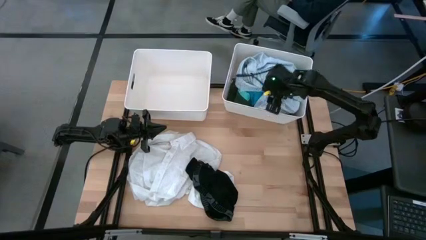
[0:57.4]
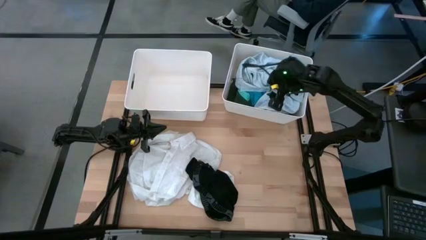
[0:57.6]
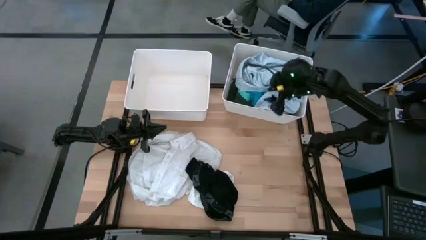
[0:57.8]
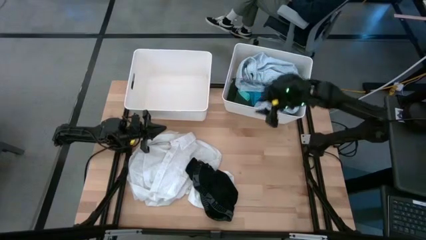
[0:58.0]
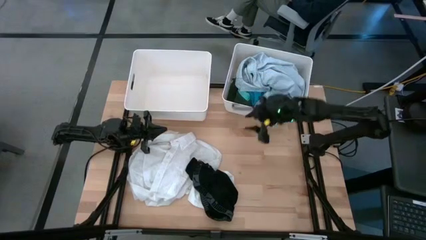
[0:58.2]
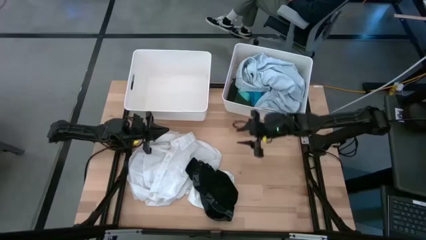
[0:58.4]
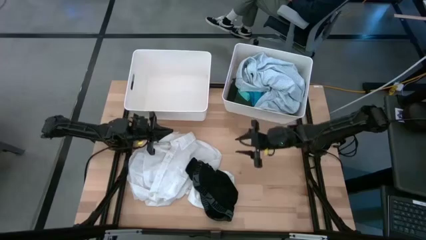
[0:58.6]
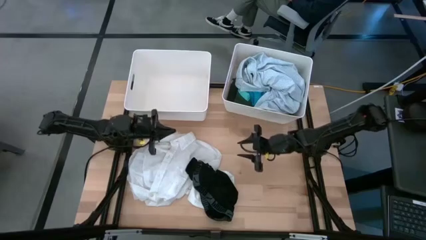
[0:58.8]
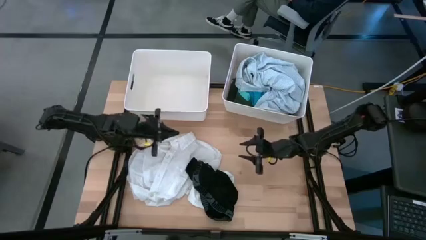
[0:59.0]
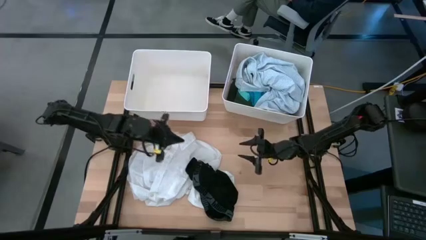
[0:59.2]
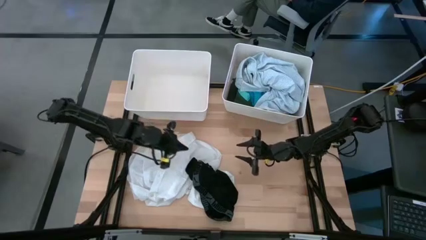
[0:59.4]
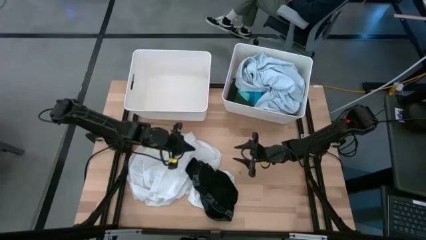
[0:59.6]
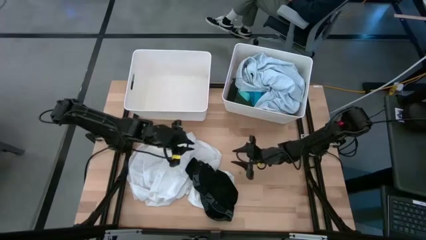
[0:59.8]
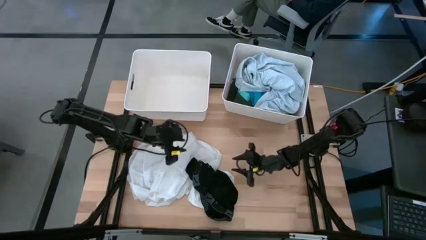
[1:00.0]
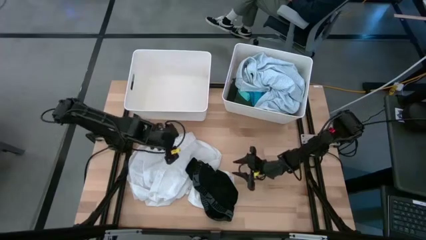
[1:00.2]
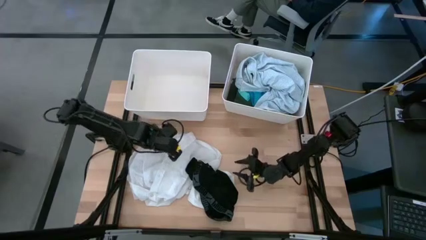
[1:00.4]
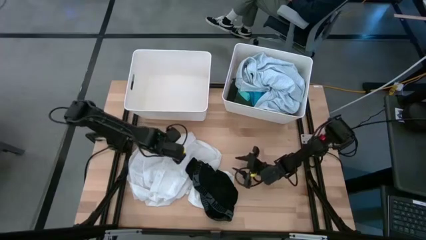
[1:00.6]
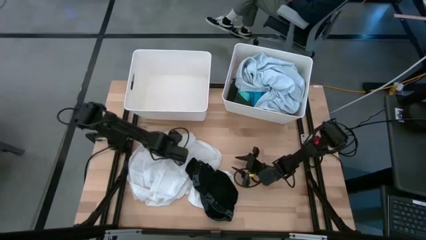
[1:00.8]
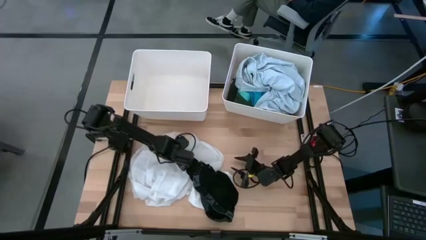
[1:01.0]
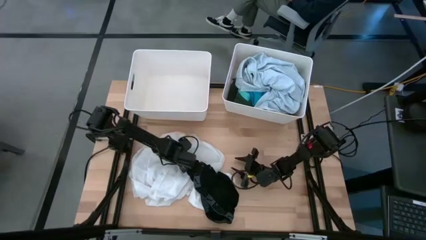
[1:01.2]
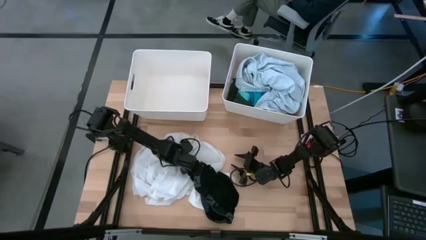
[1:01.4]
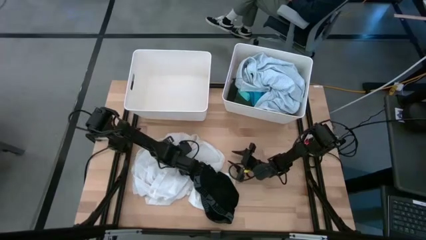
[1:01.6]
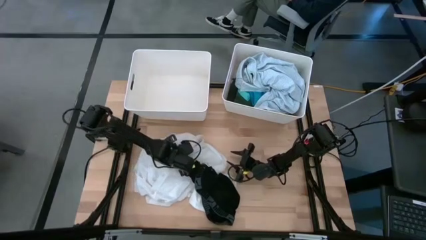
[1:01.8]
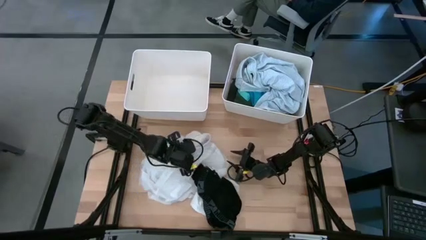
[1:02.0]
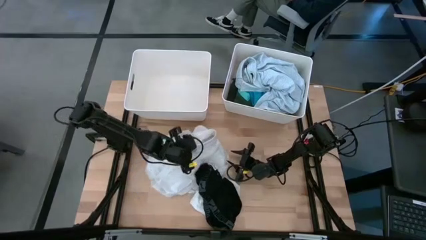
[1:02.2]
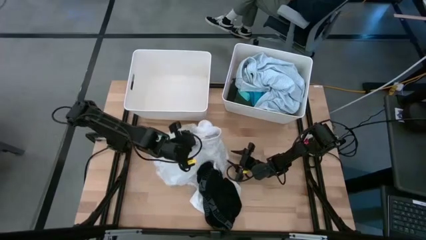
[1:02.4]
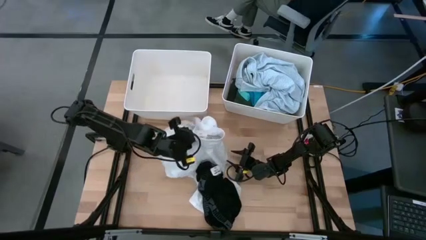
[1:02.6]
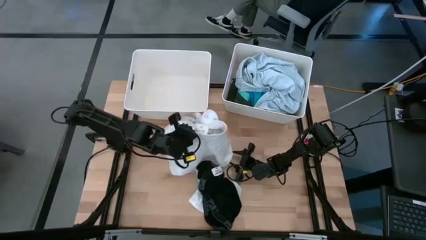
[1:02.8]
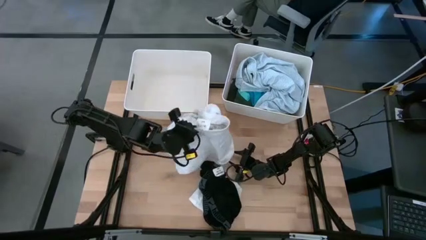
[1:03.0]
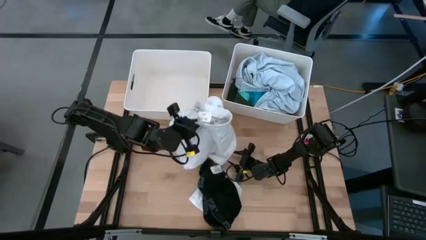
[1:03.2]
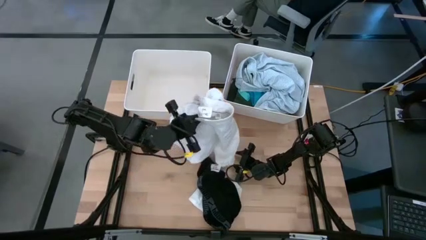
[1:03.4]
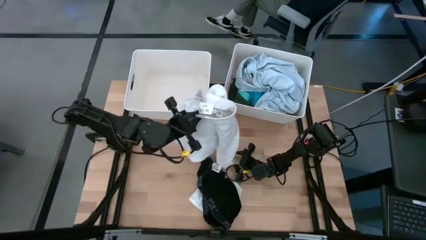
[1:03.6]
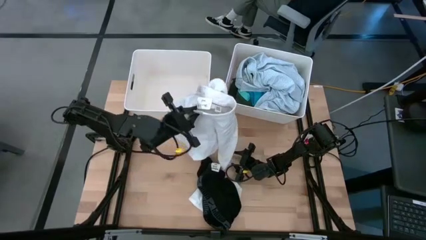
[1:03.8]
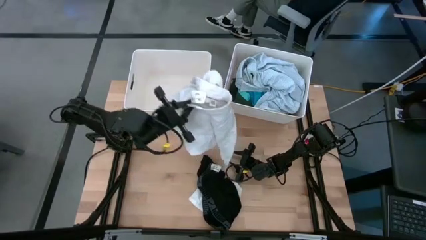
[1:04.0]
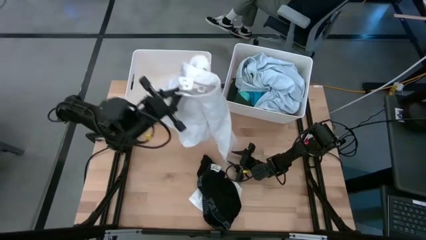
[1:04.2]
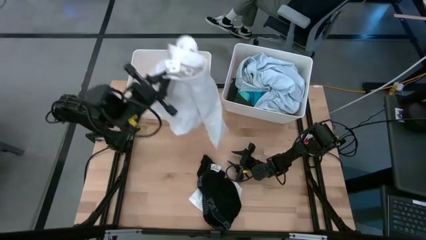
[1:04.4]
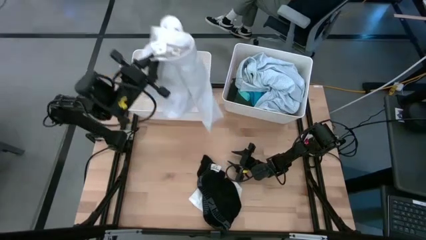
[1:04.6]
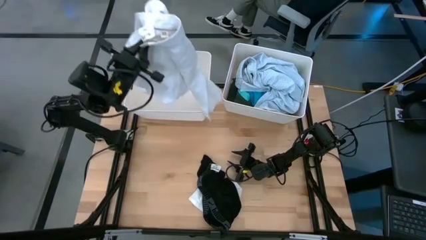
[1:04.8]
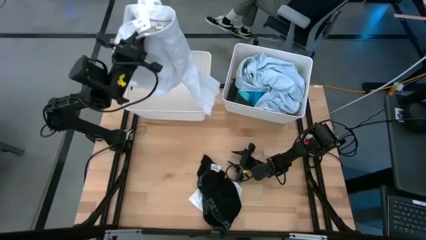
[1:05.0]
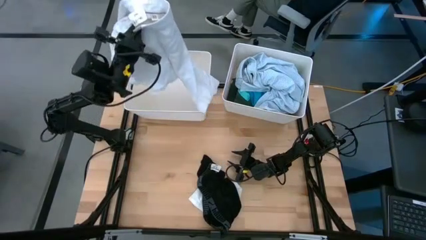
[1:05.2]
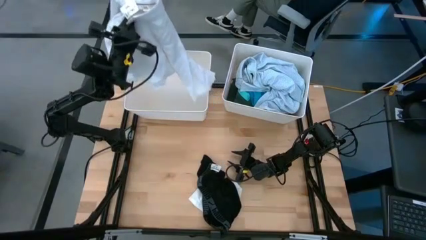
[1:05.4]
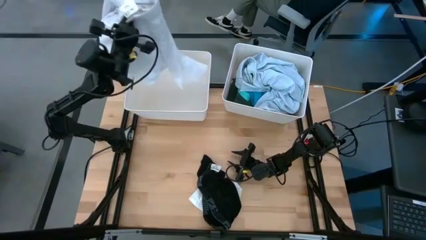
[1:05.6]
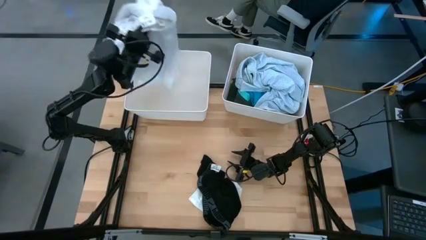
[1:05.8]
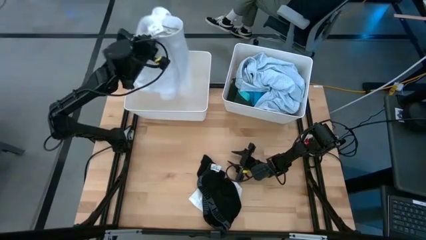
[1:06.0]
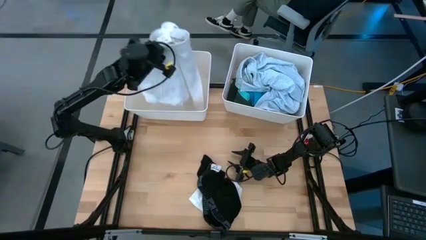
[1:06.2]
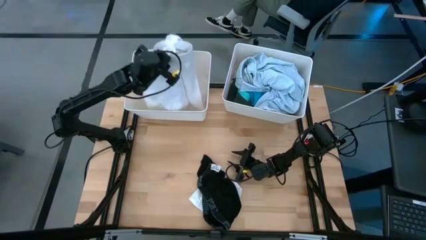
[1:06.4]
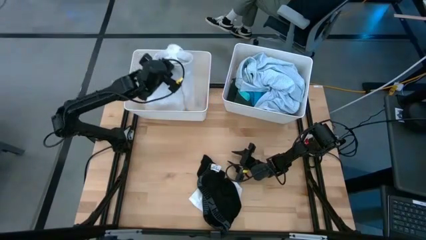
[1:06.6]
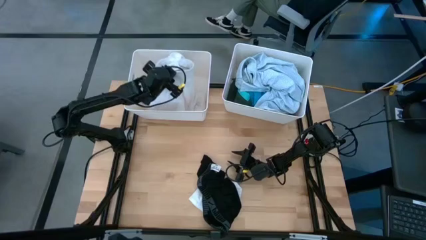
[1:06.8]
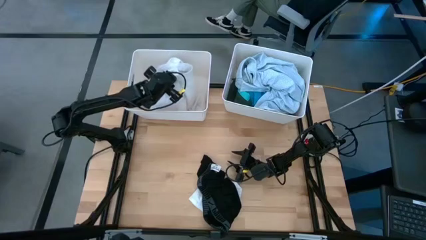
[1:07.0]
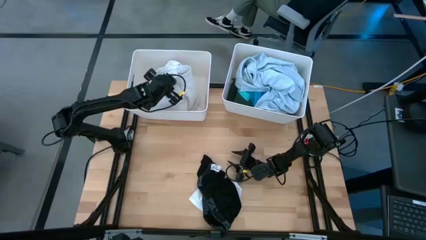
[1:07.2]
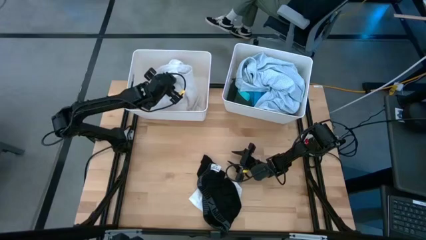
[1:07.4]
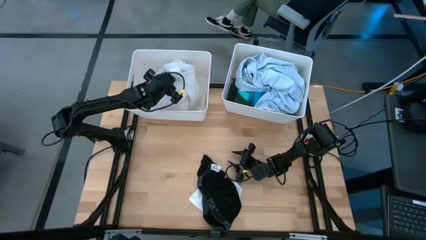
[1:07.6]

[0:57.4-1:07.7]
Task: Sort clothes
Put the white polo shirt into the left white bin

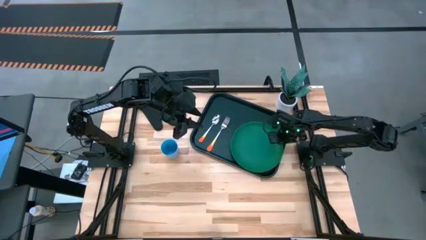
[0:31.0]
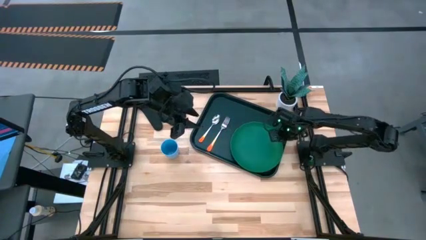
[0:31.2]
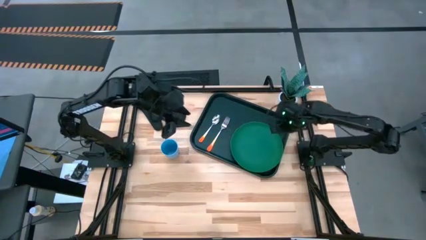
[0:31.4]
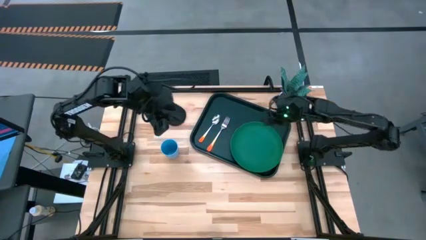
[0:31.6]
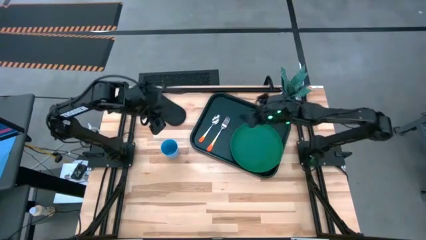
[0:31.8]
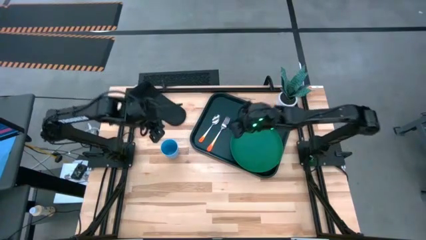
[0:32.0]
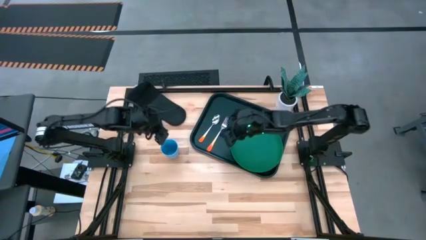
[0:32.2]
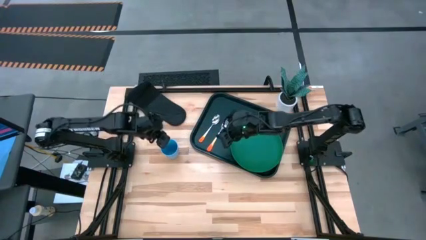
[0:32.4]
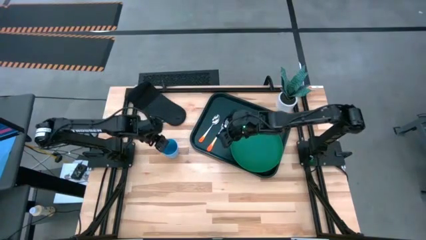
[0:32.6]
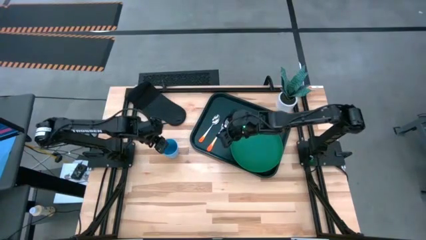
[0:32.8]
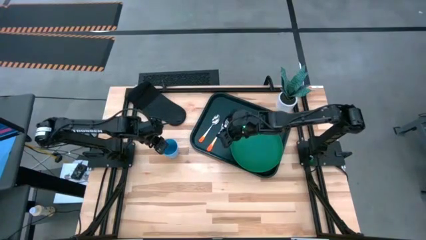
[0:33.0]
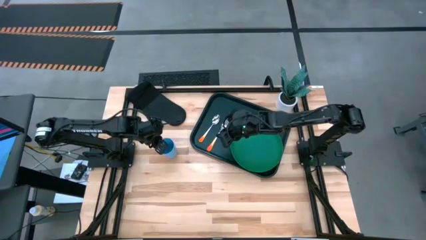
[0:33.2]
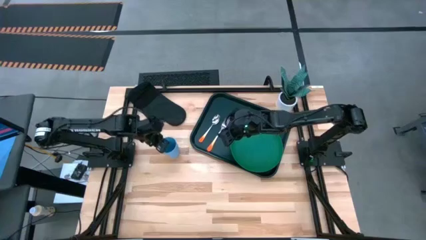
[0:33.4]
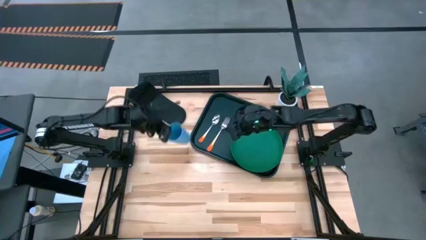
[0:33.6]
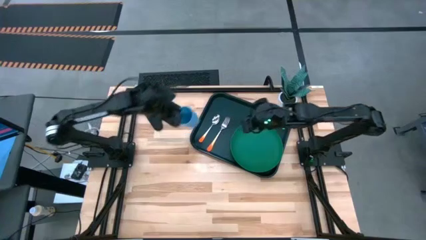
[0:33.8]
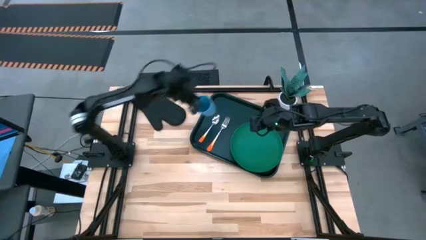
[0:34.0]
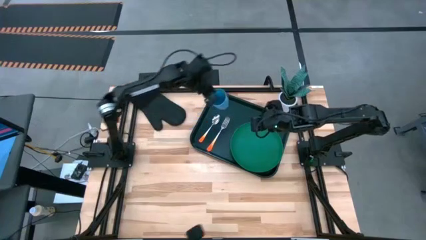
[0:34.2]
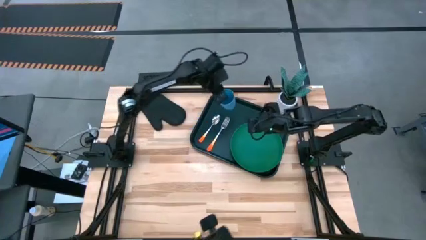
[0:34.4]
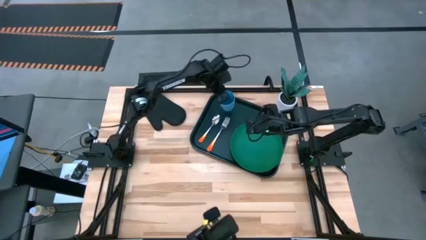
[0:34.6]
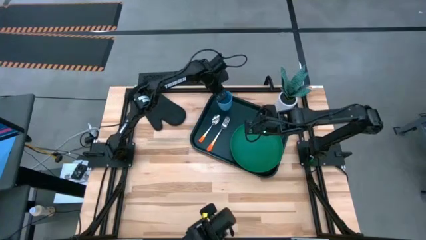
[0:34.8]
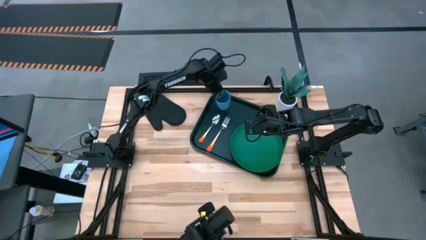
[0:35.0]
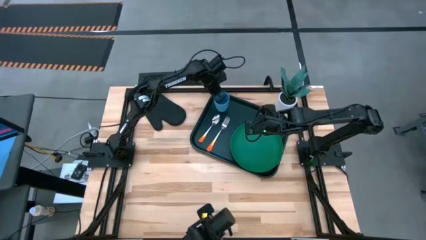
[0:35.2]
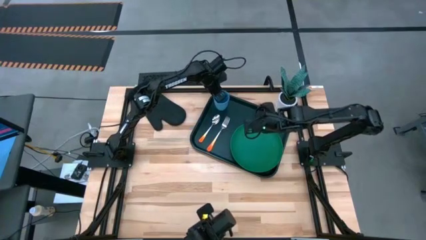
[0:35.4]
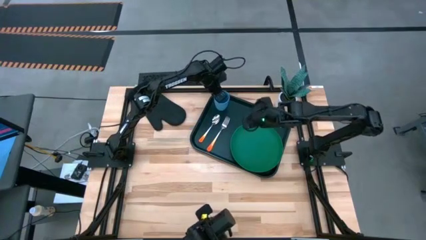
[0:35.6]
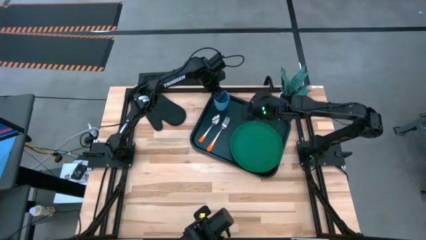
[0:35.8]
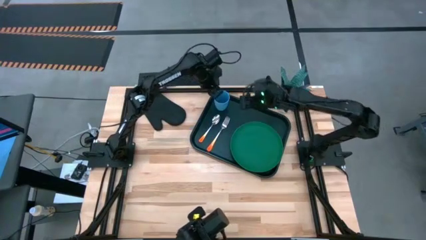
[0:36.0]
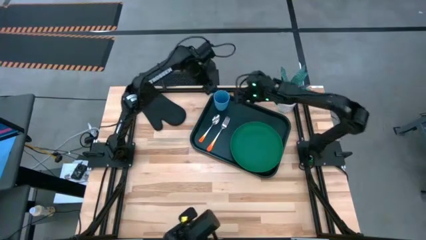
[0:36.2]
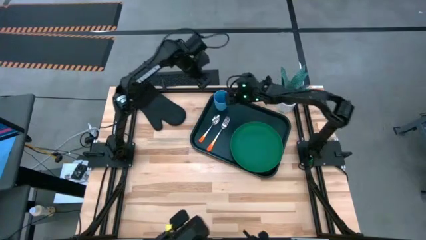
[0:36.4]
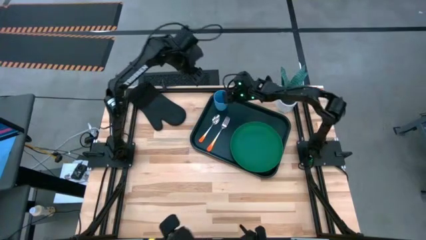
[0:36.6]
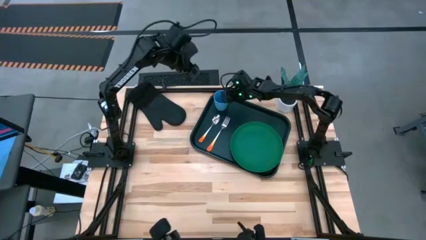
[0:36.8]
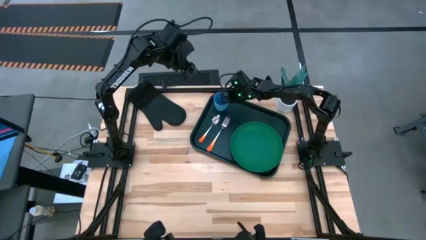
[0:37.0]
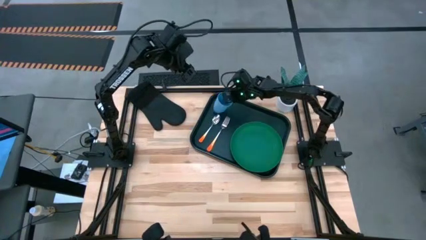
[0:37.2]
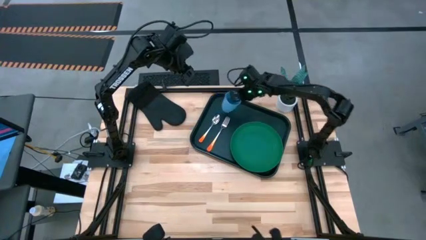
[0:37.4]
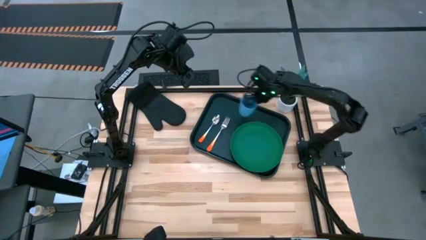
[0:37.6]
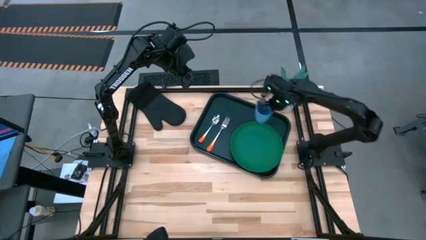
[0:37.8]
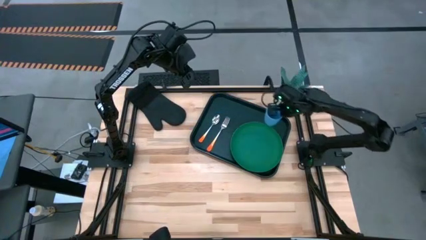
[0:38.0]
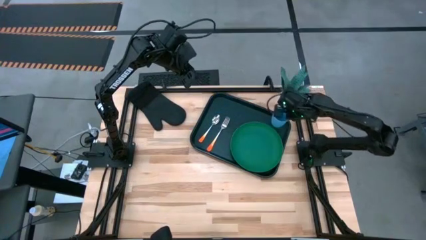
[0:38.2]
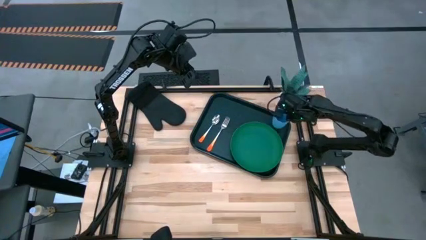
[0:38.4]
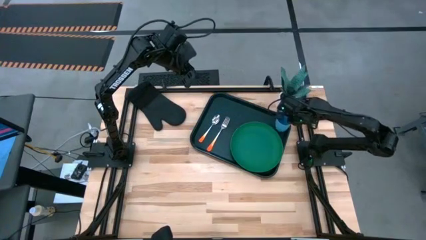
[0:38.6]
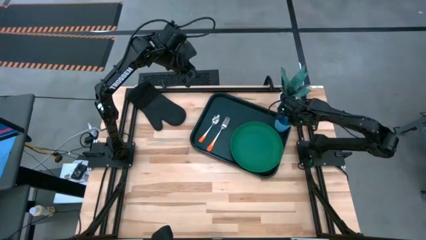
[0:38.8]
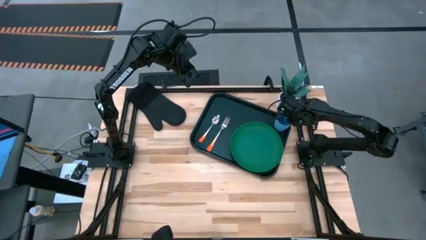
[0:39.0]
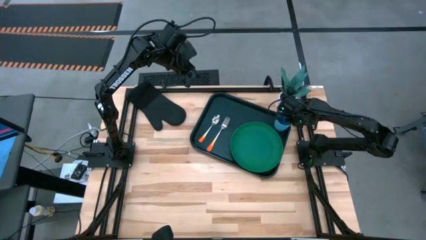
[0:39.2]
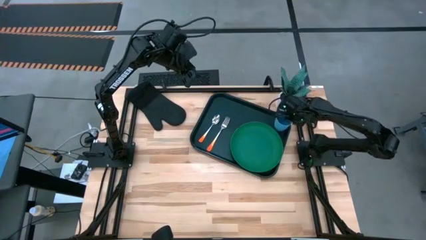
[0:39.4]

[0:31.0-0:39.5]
Task: Pick and place plate/cup/fork/spoon on tray
Put the blue cup on top of the orange spoon and fork on the black serving tray
